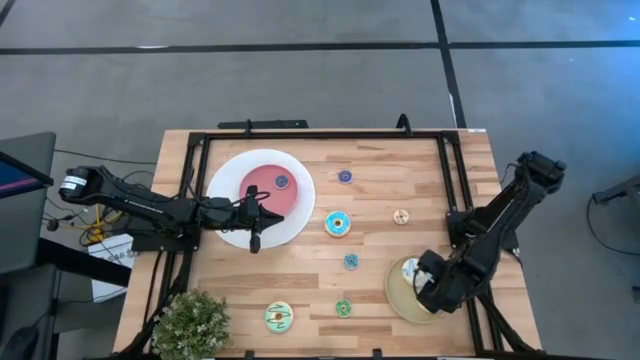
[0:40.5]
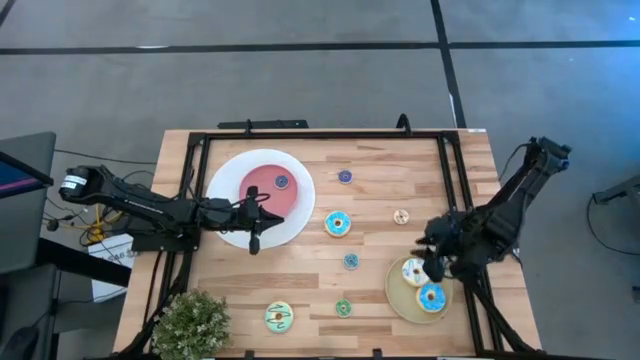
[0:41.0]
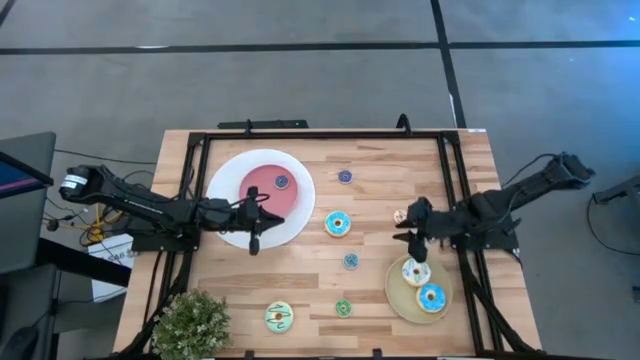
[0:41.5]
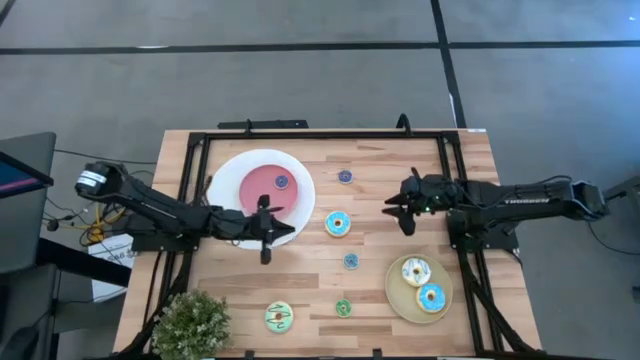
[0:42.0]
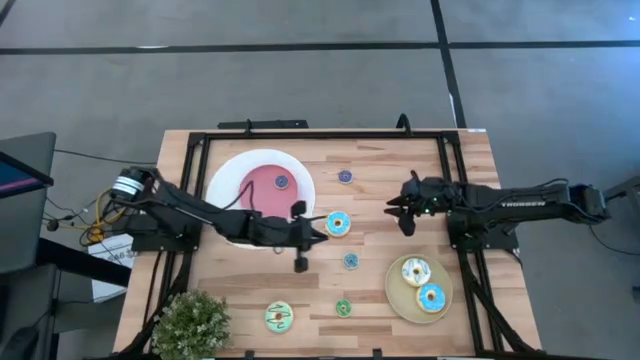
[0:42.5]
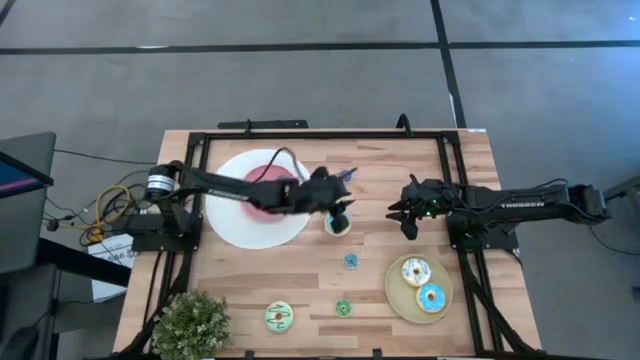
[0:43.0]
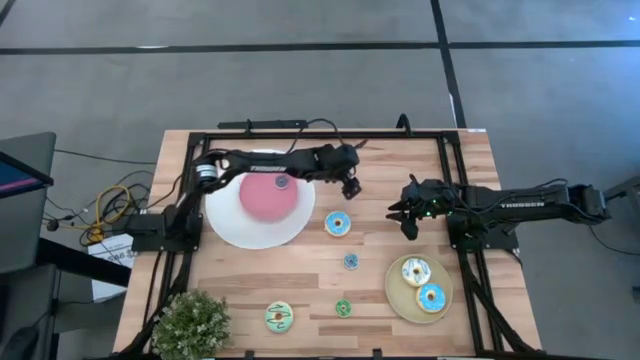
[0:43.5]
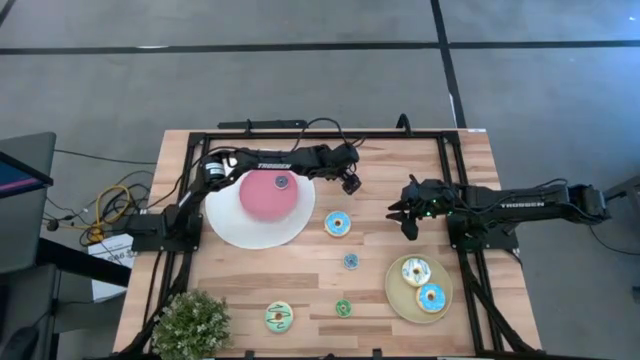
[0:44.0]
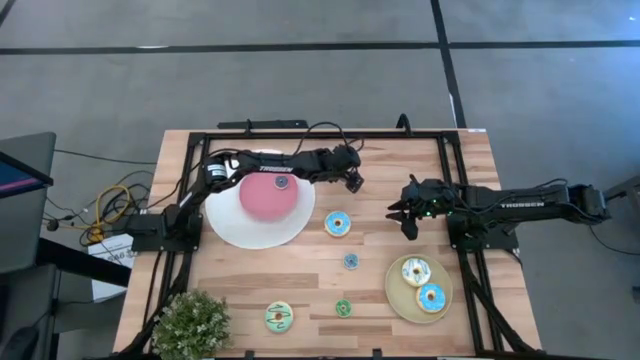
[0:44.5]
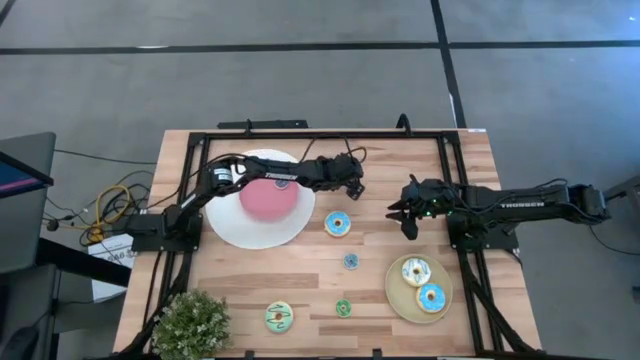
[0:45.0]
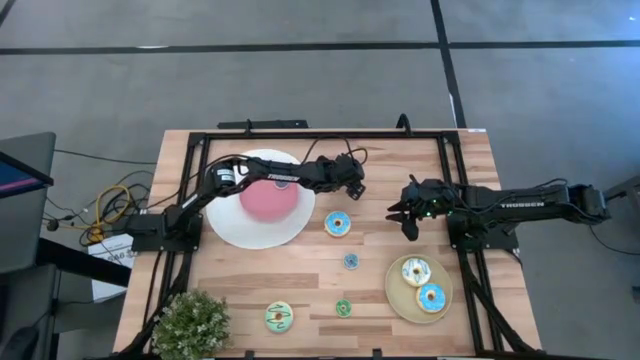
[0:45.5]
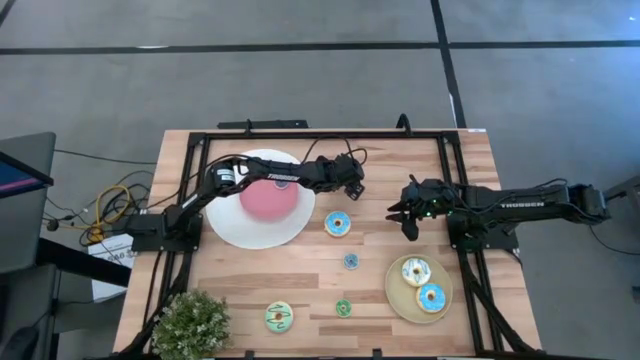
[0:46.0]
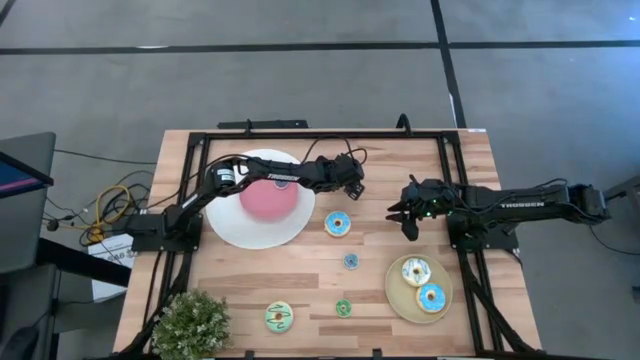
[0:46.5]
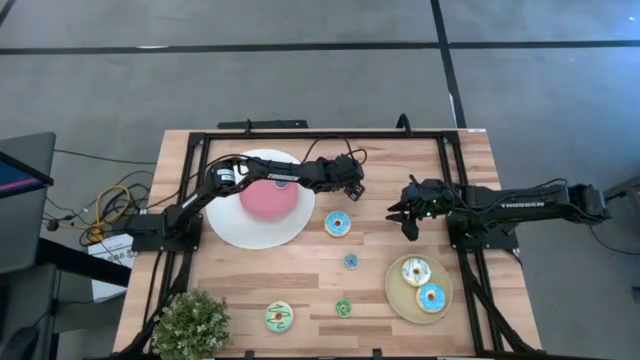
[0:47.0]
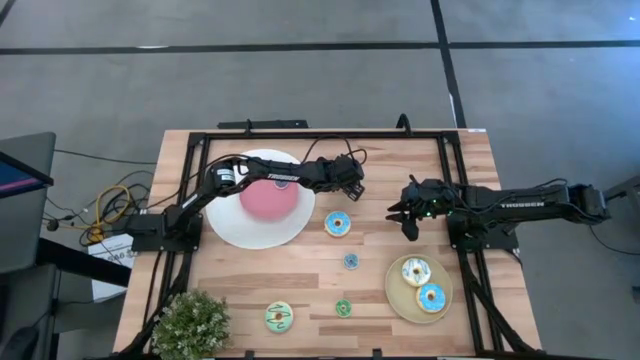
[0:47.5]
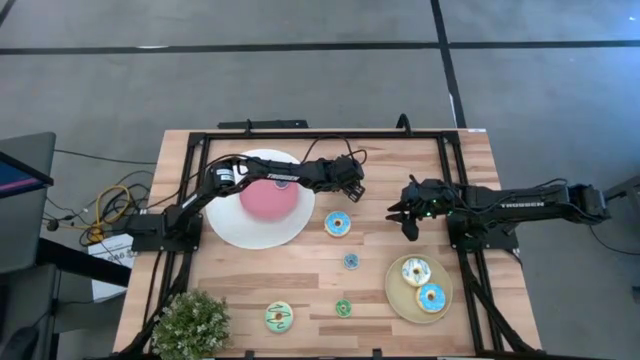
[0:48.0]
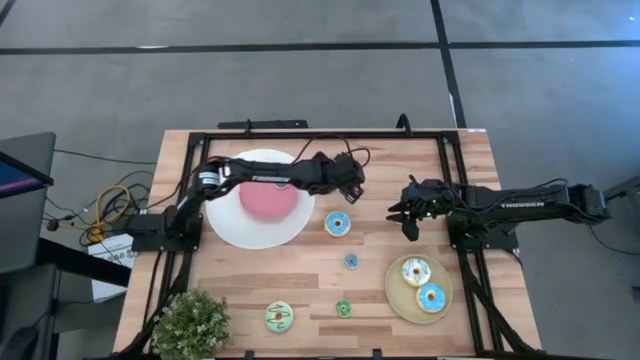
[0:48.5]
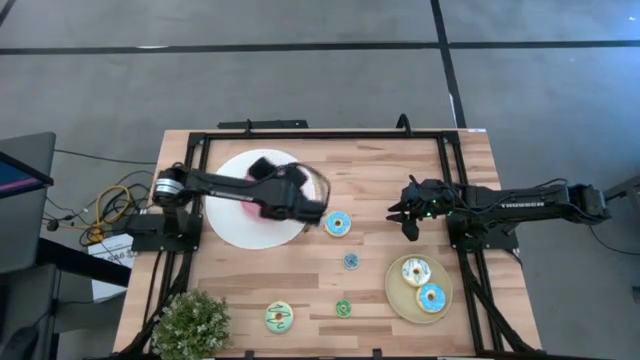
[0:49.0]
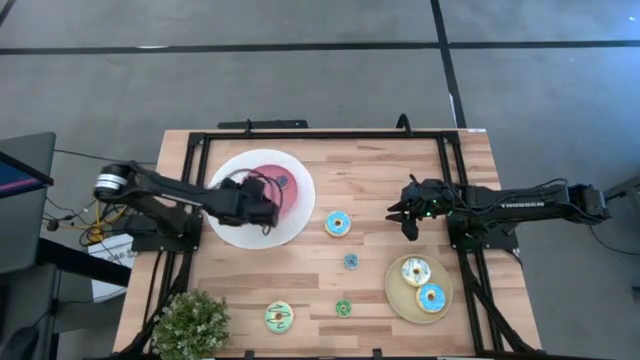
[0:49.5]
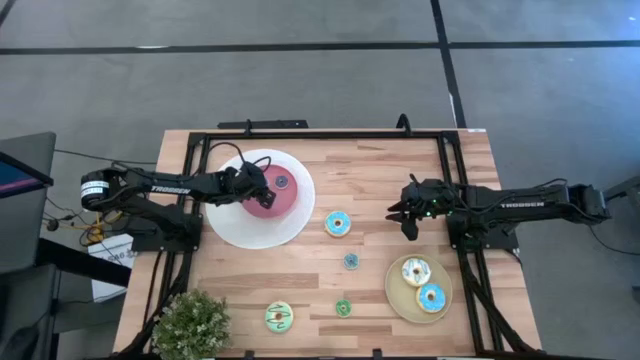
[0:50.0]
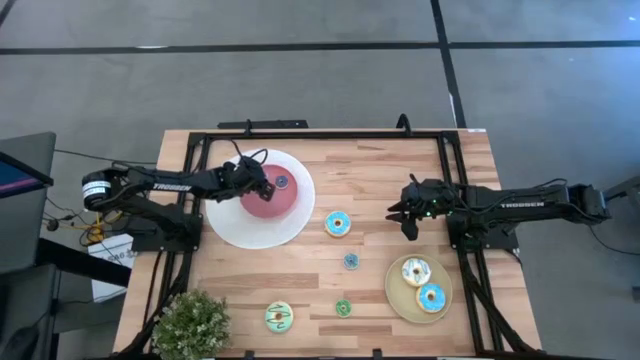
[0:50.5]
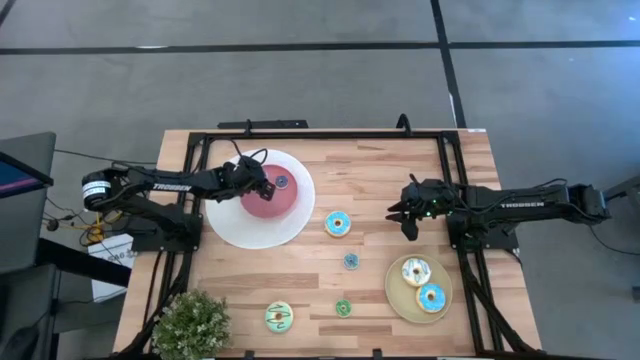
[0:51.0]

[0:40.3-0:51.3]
Task: Pick & Place donuts
Put the small blue donut onto the pink plate

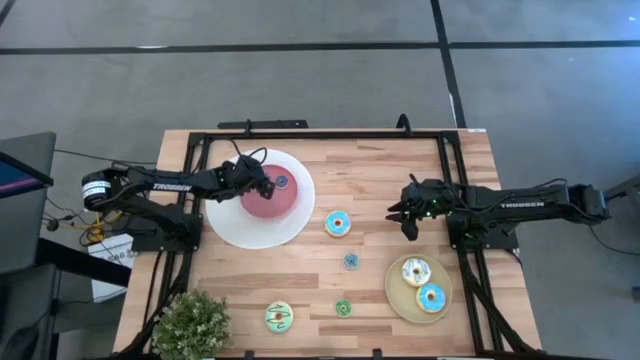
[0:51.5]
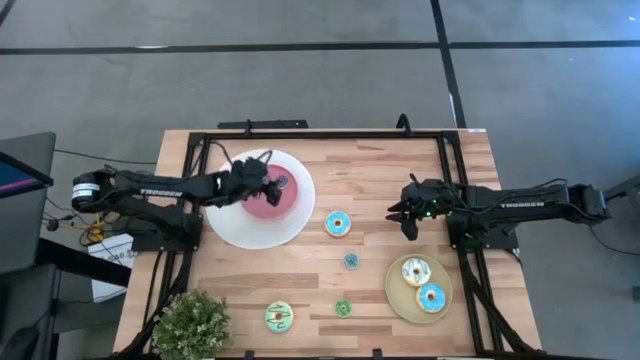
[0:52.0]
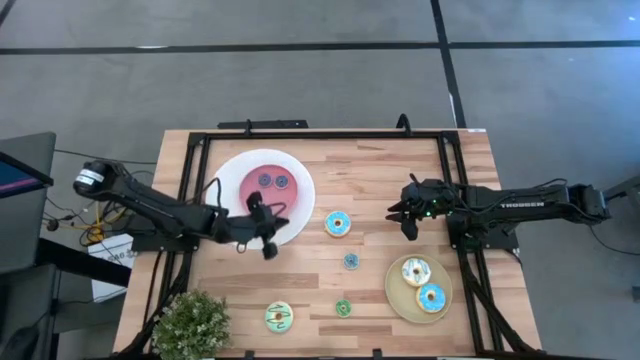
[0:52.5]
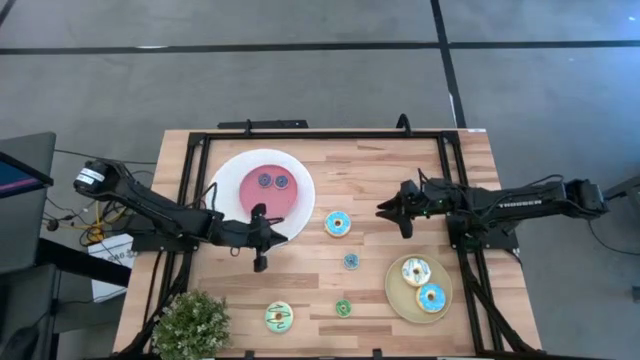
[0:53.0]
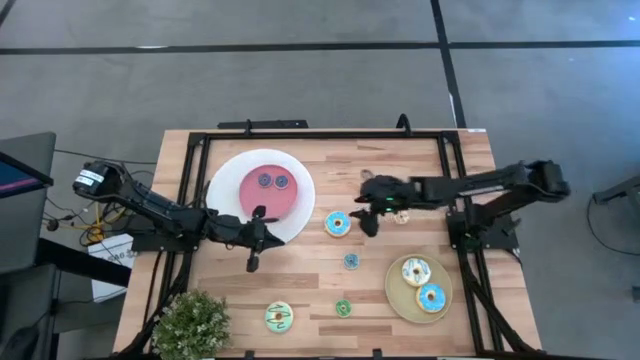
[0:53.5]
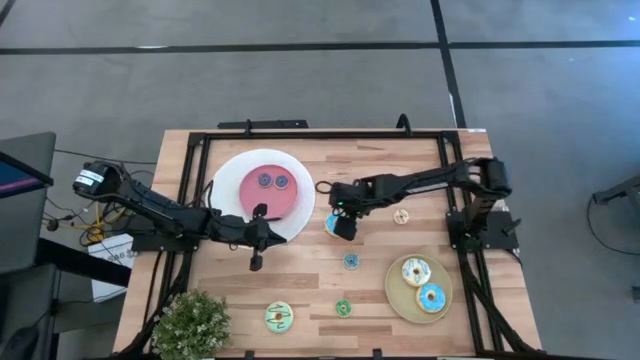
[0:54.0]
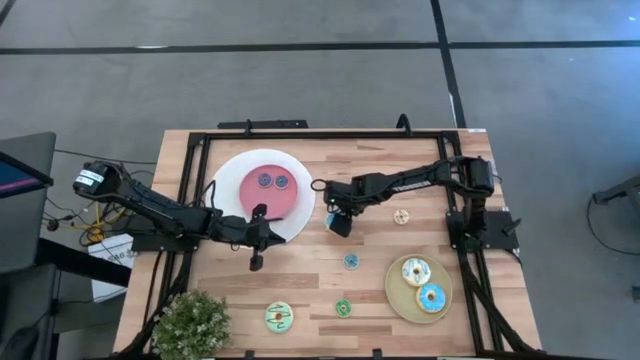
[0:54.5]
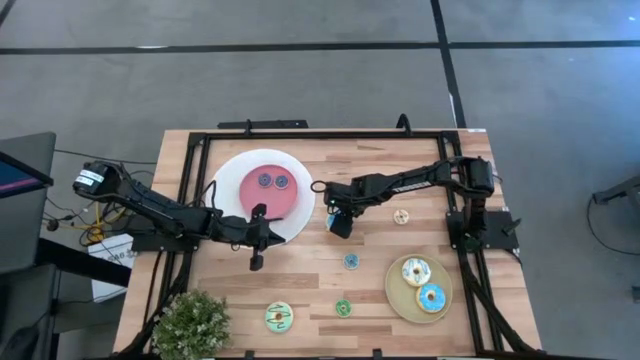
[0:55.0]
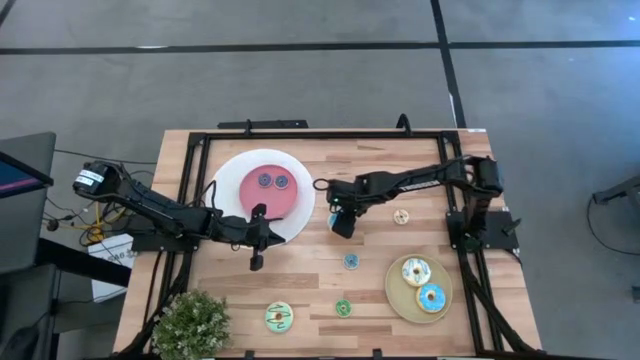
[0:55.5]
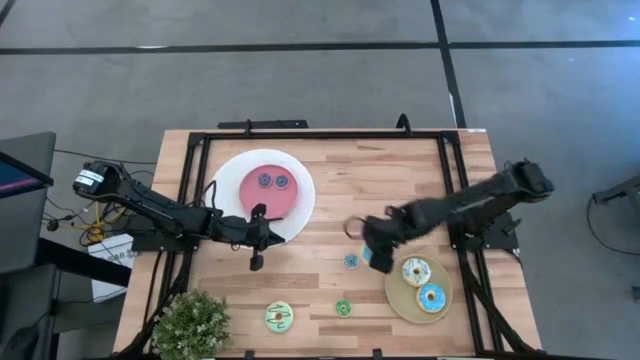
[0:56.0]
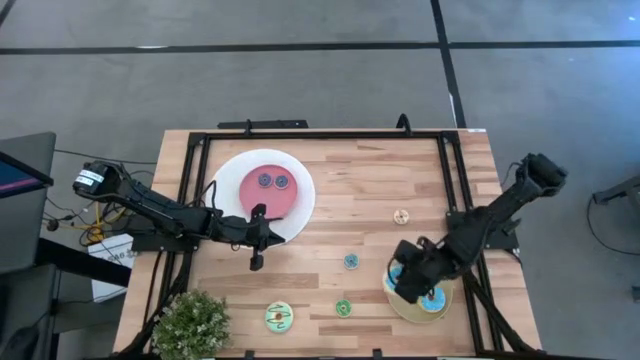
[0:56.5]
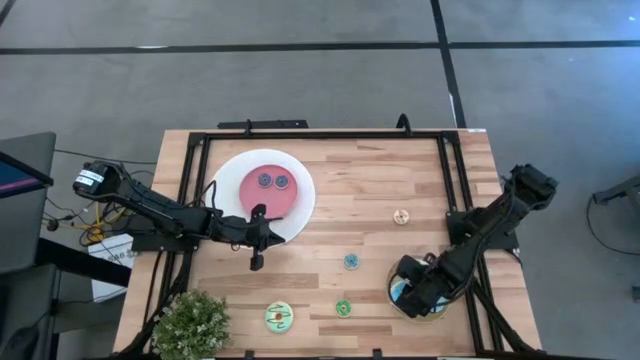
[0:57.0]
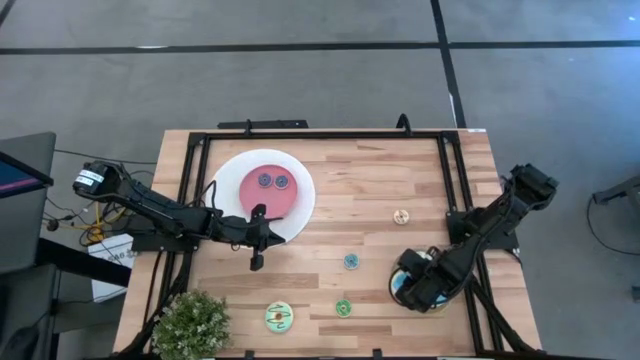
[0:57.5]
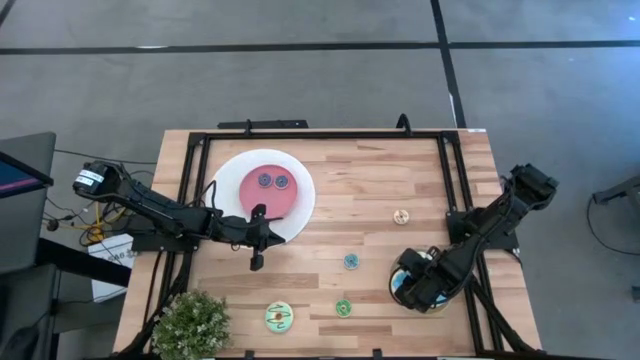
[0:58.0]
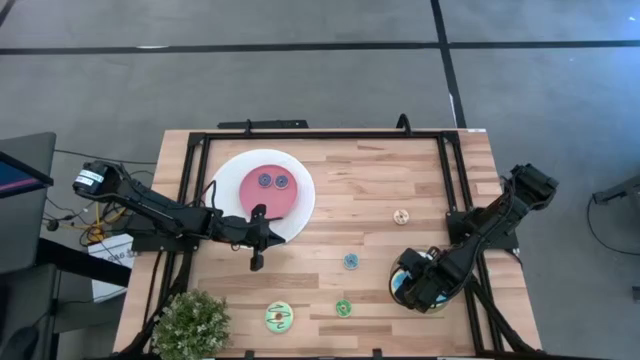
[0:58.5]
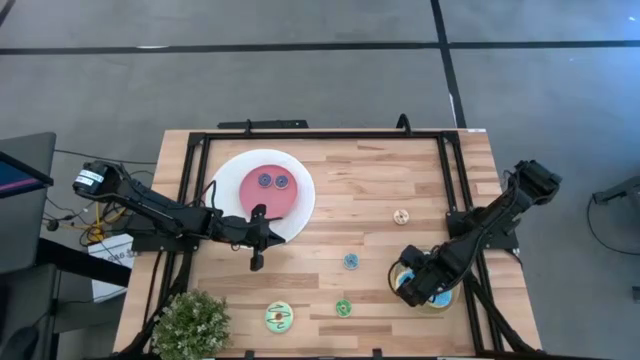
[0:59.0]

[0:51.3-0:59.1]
Put the large light blue donut onto the brown plate

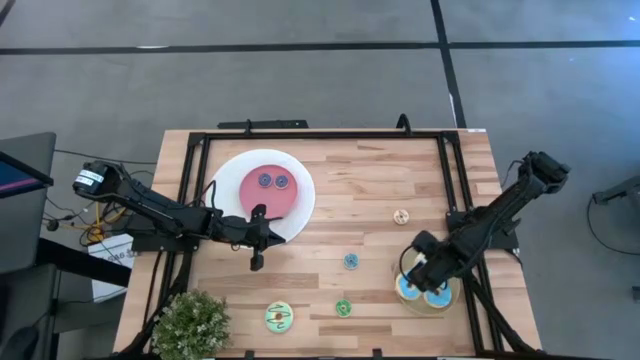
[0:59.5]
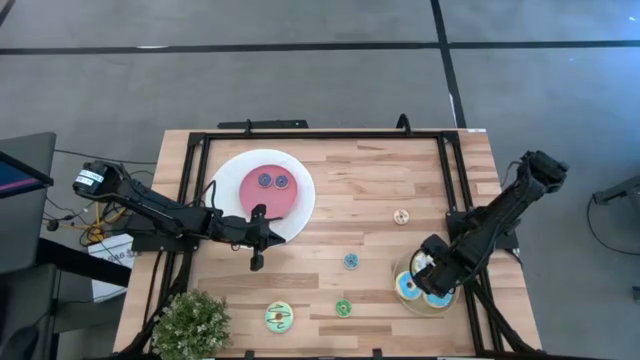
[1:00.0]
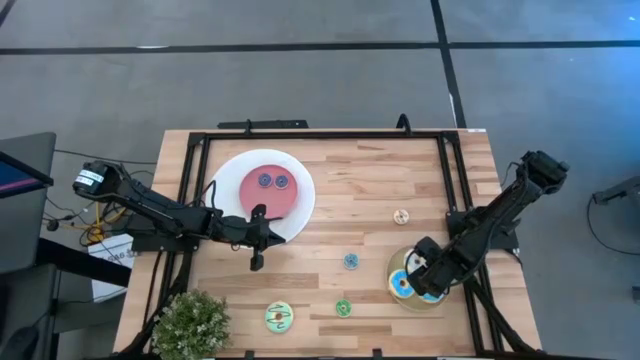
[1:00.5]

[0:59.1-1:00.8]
Adjust the large white donut on the brown plate
